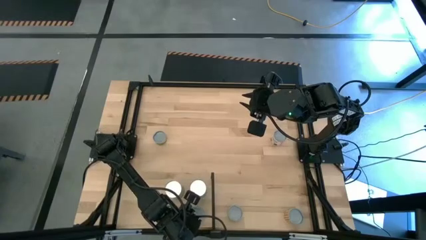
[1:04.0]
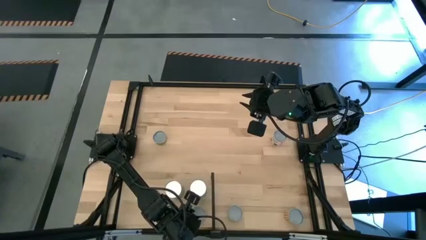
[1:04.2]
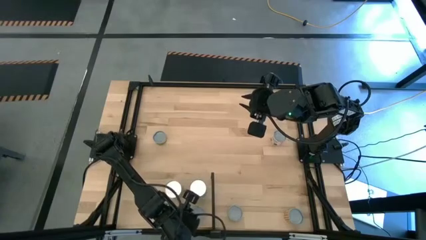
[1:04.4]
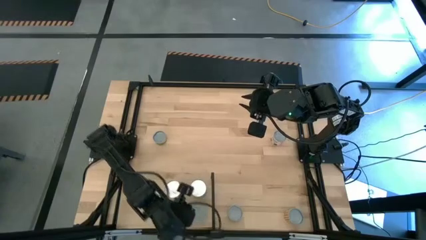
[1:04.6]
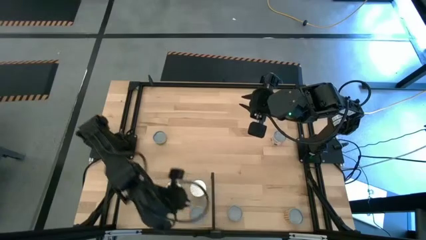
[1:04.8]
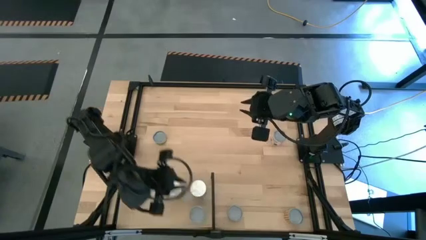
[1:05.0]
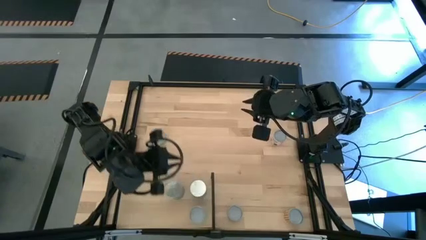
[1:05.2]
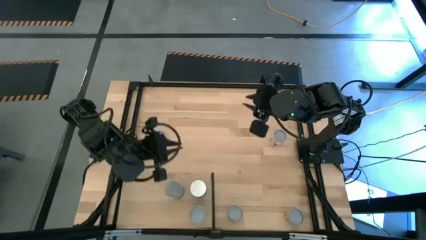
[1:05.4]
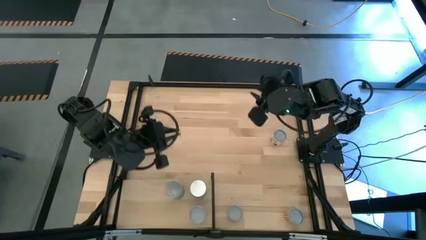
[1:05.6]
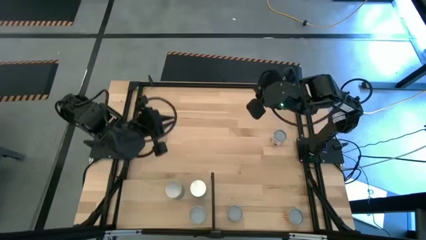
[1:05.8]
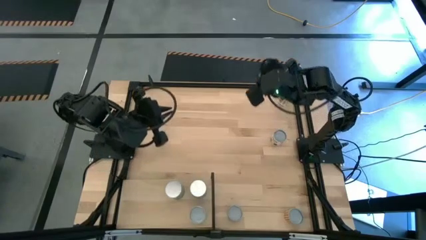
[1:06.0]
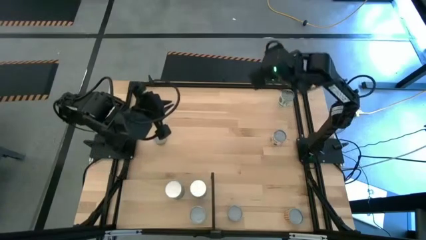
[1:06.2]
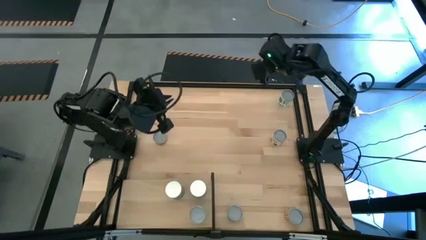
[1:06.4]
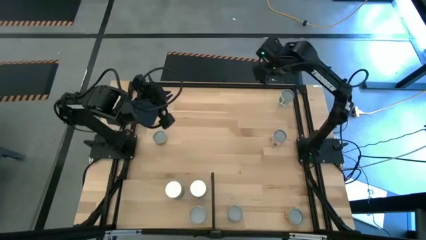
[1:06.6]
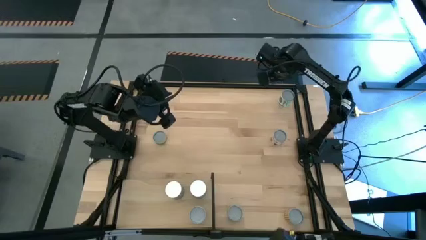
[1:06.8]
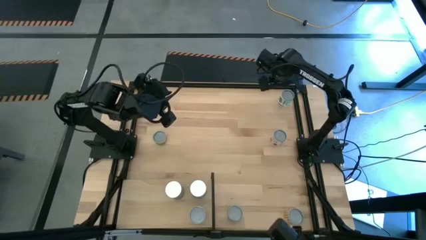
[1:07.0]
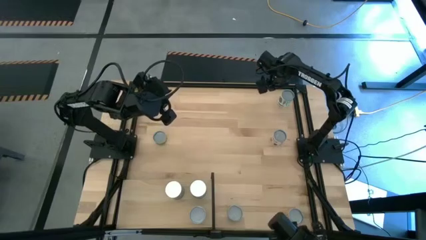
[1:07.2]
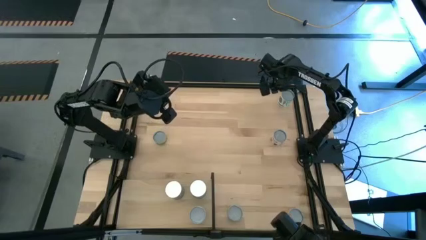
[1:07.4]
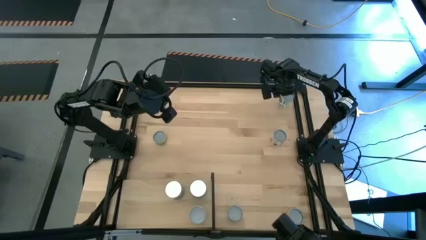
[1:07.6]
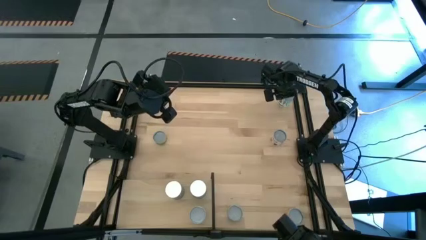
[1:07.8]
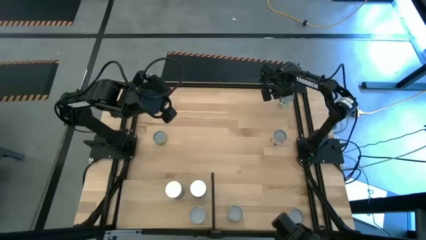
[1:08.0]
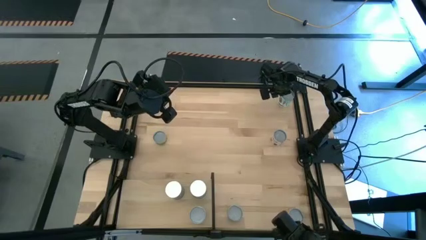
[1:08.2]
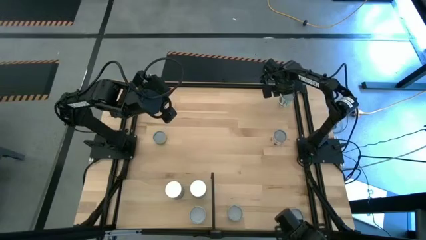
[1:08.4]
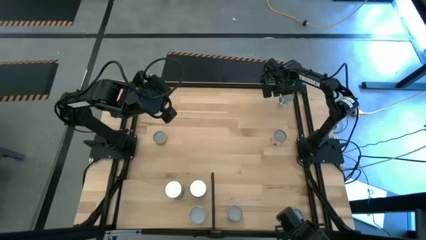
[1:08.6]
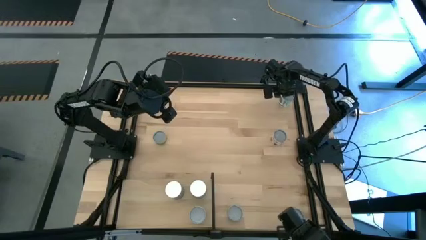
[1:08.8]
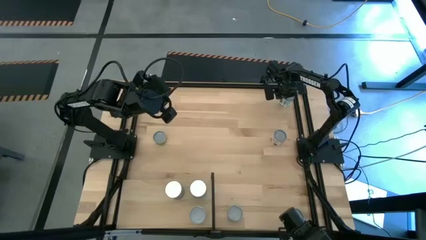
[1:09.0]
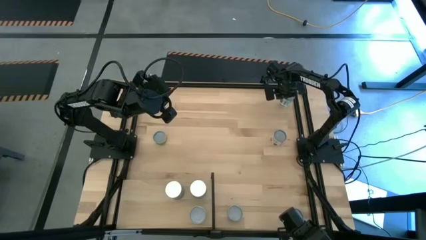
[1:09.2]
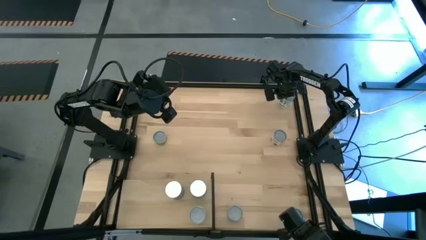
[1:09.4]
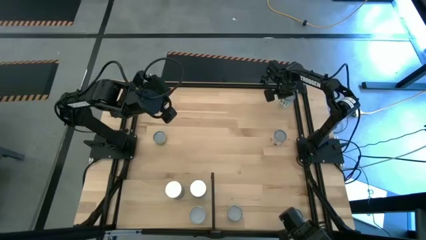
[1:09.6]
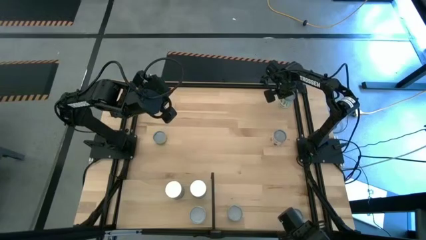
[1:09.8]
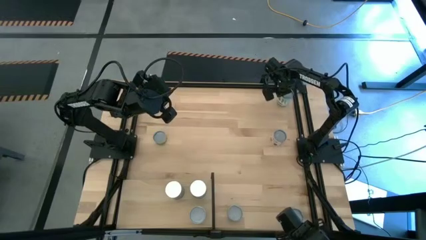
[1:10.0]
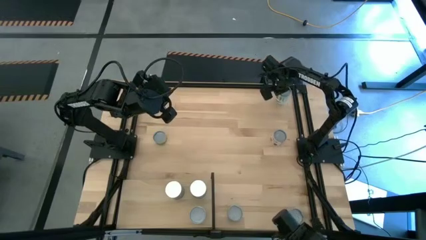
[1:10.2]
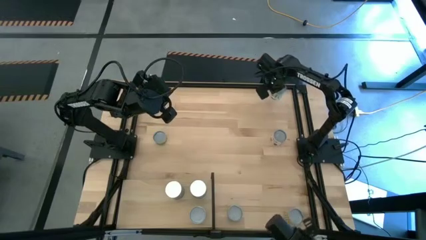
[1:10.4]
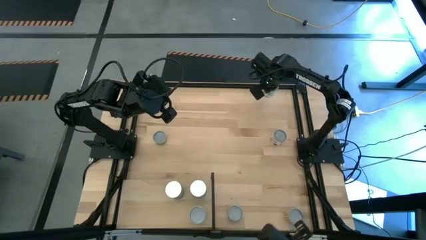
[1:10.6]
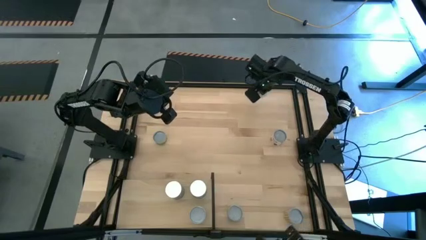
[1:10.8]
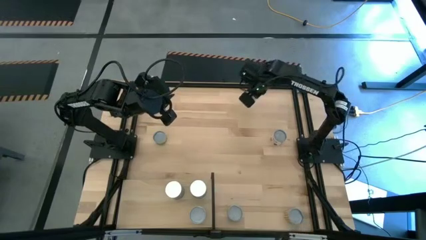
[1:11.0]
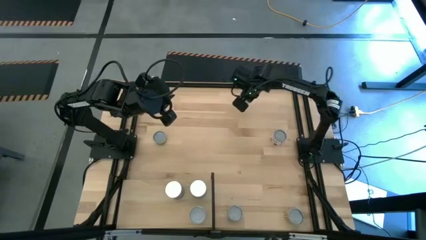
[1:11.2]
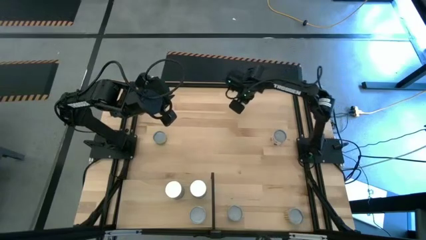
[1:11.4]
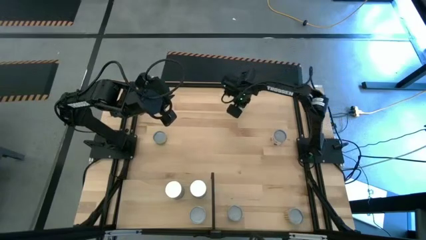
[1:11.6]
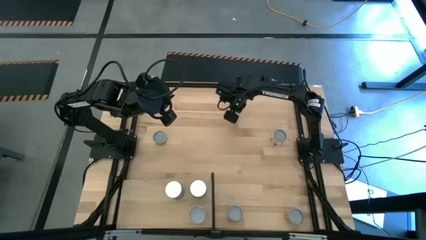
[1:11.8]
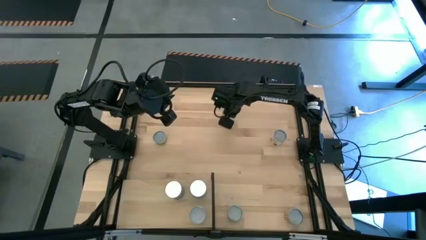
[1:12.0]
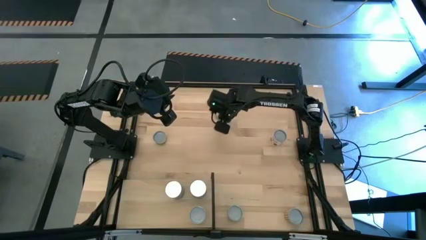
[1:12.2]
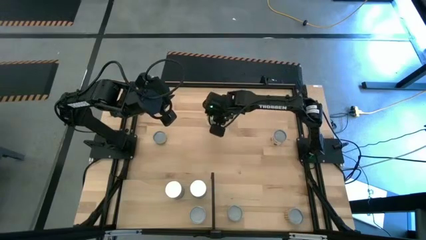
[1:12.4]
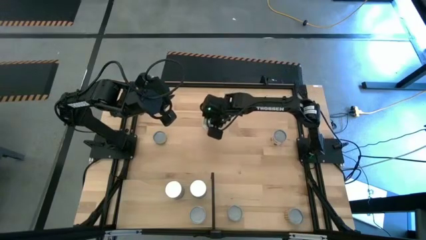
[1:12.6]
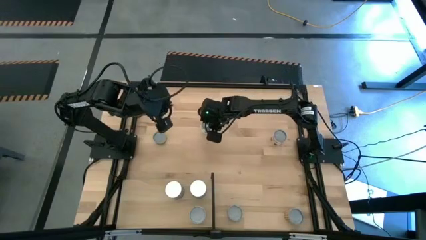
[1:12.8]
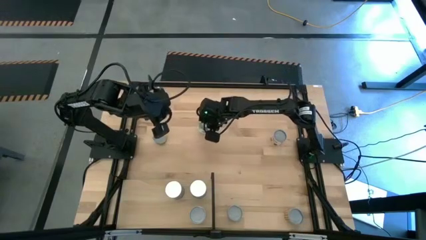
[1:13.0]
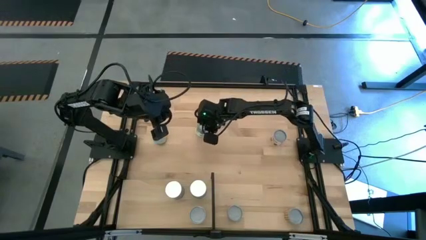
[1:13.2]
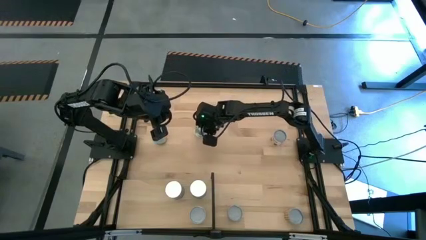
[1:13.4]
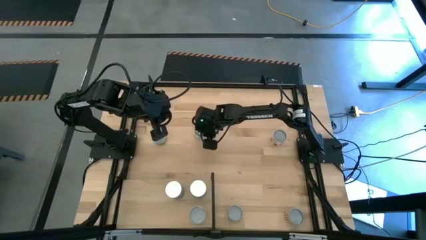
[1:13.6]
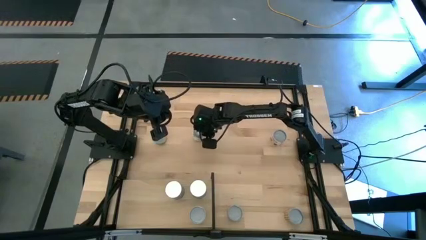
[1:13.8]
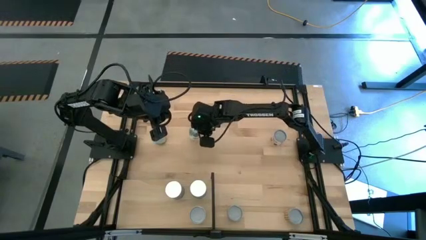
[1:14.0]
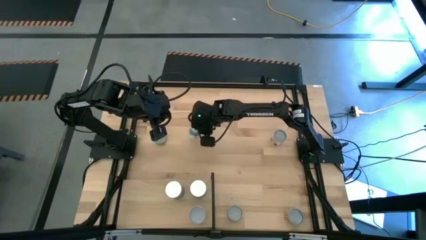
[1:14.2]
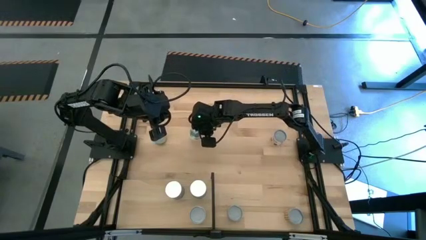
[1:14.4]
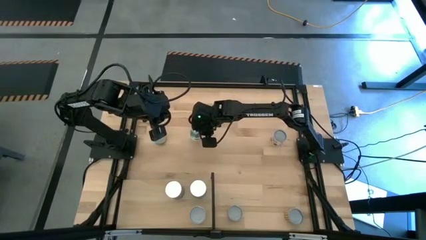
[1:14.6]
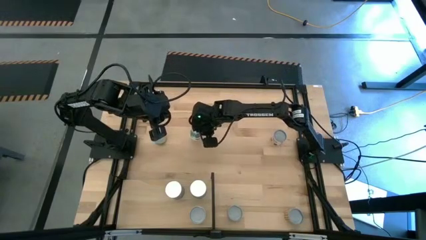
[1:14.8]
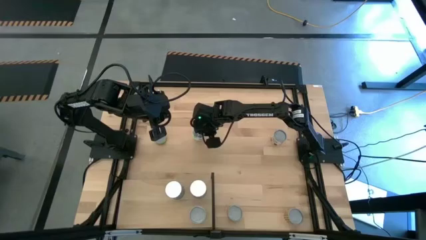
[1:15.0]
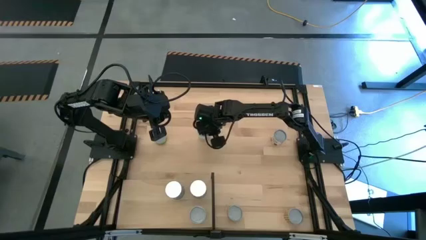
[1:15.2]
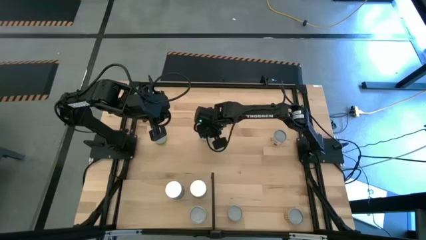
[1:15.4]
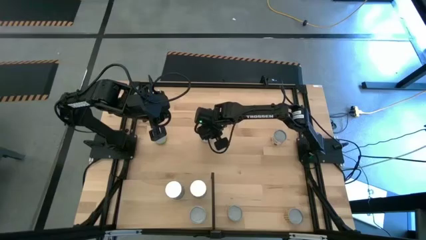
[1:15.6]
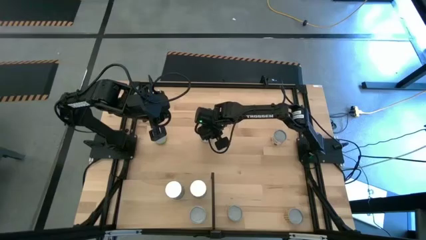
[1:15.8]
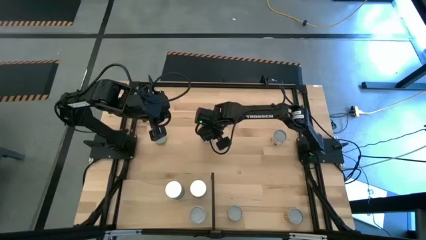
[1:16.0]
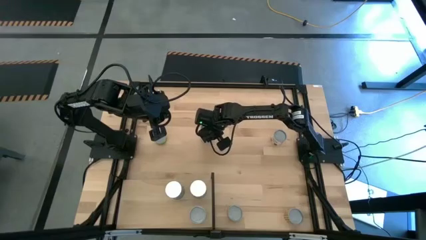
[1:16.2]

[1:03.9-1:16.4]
Task: Pick and place cans onto a shelf
Put the canned mixed veggies on the shelf

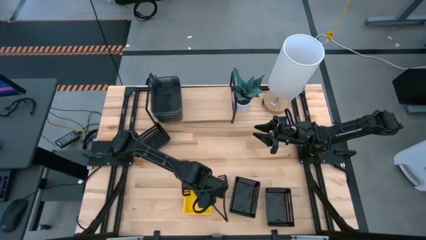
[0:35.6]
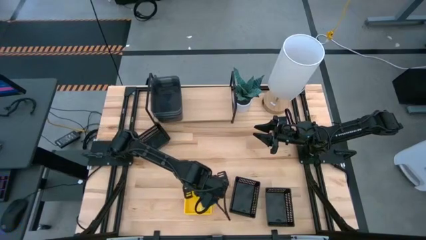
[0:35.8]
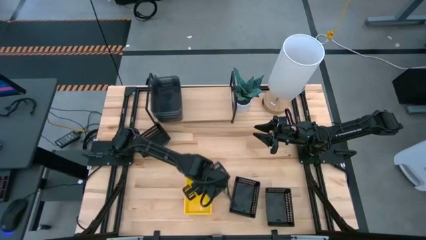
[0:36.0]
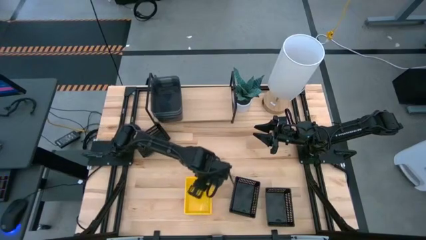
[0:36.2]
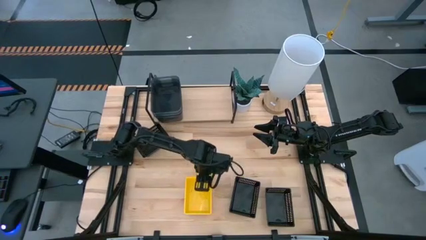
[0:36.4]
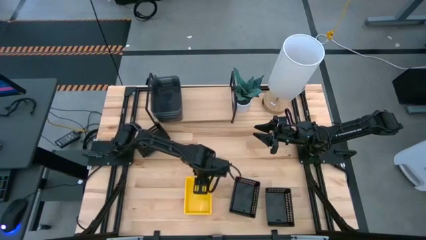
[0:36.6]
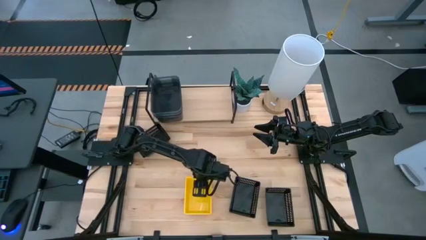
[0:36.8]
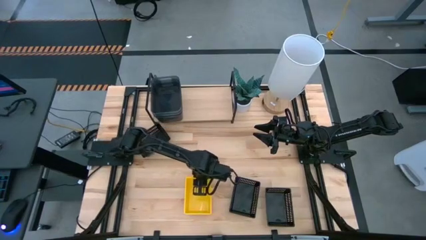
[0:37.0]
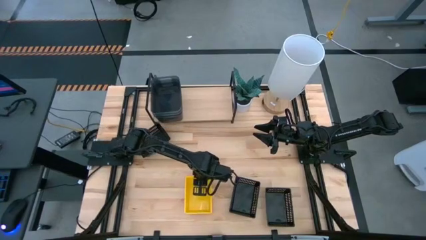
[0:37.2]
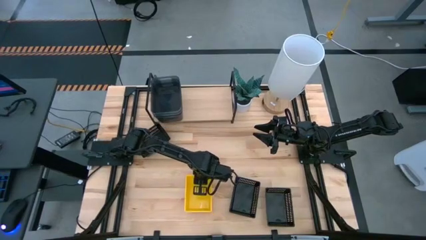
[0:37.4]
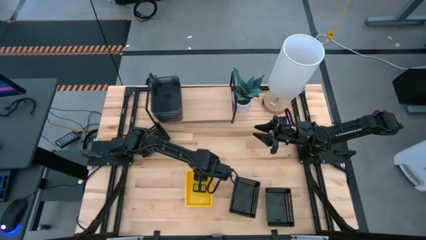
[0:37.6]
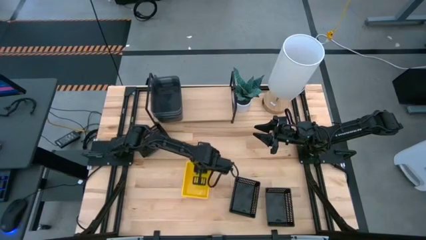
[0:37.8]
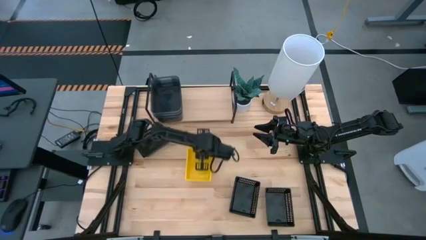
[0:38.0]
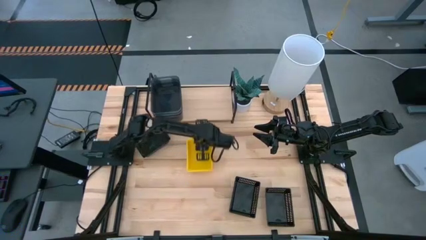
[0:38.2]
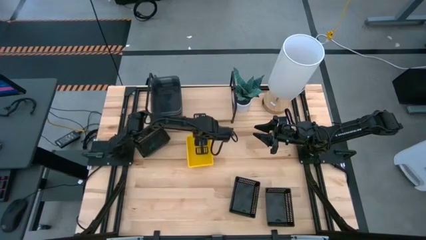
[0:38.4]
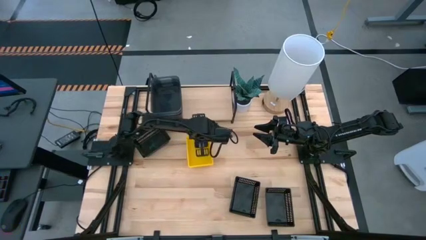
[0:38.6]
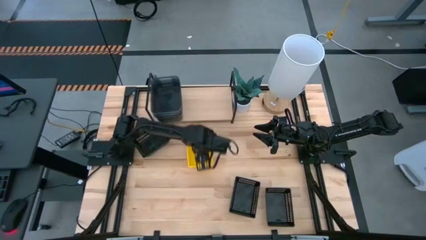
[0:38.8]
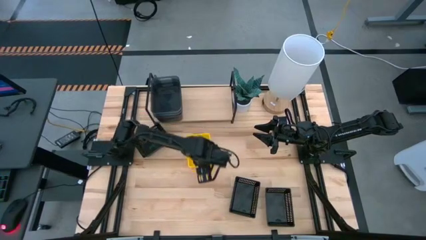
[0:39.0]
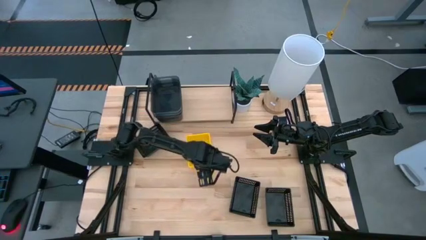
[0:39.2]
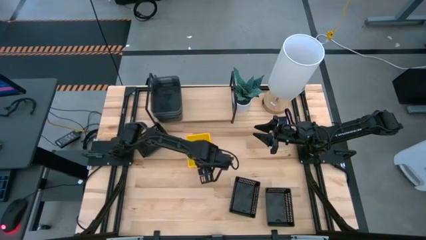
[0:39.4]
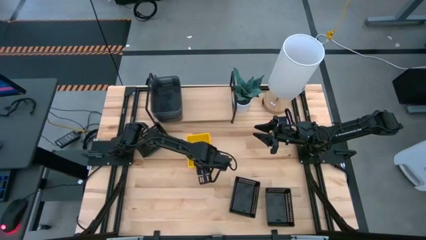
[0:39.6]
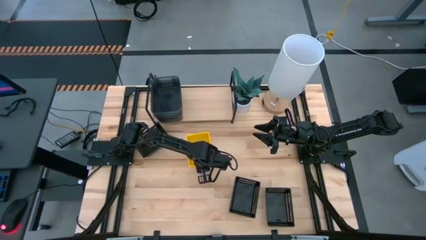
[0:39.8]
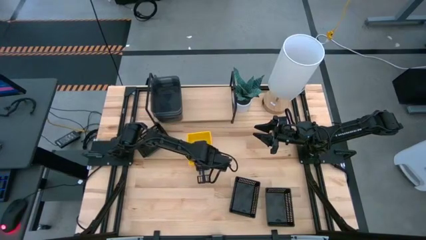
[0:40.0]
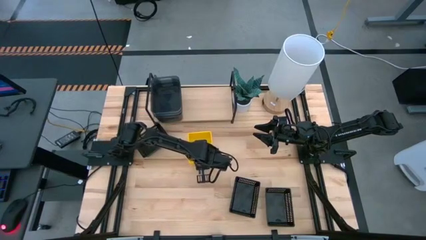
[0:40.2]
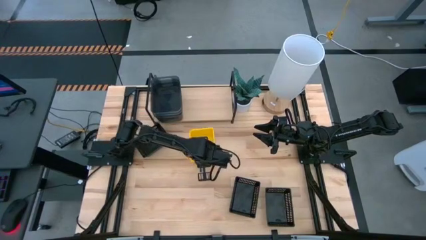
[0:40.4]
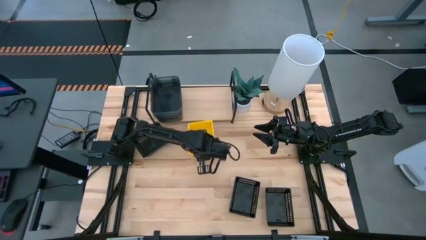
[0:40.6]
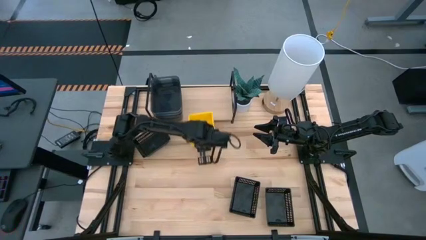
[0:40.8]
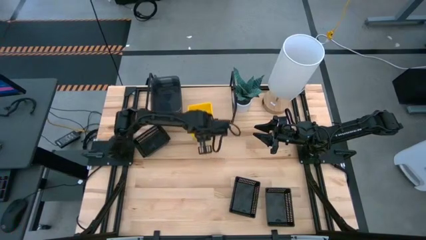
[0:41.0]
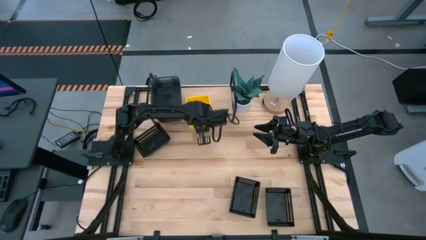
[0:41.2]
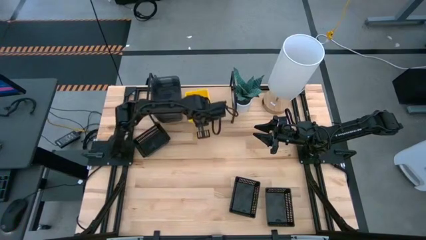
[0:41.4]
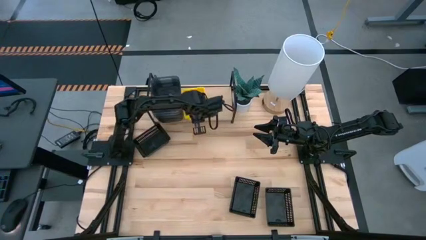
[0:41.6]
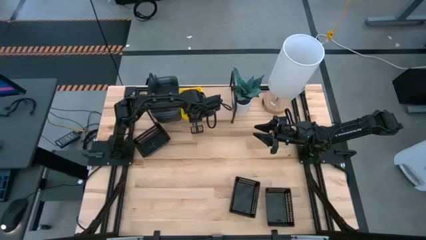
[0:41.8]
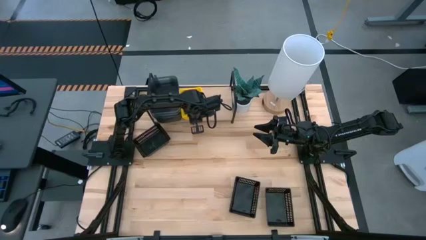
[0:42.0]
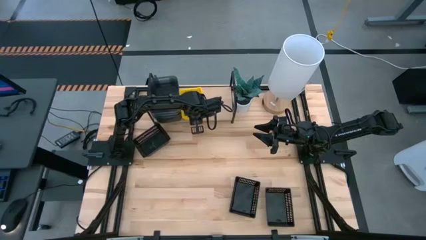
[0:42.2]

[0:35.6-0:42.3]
Task: Stack baskets on shelf by color
Put the stacked yellow bin on the shelf
